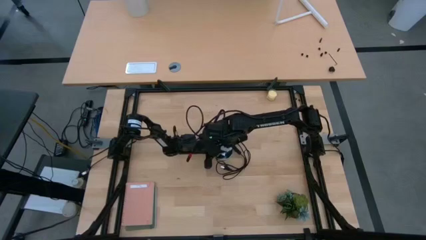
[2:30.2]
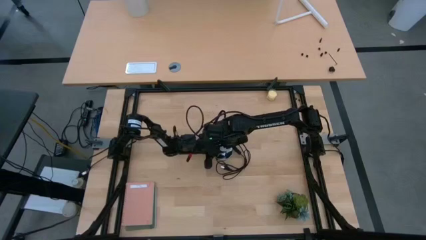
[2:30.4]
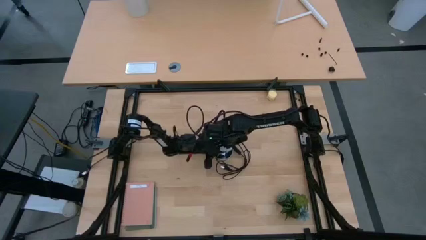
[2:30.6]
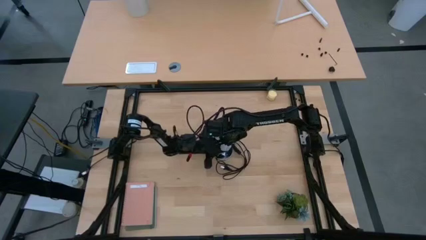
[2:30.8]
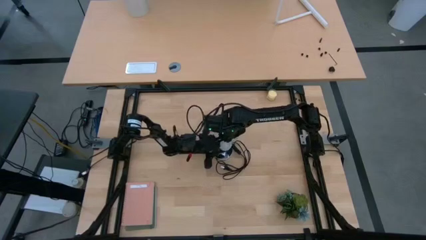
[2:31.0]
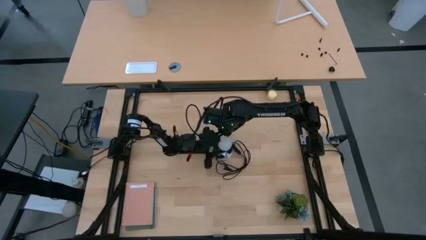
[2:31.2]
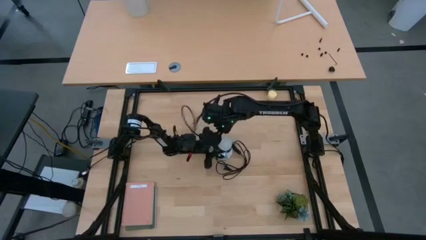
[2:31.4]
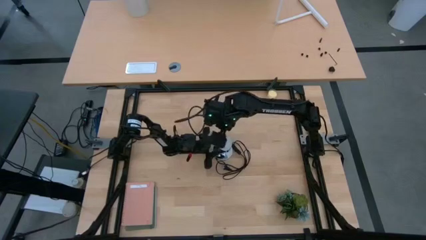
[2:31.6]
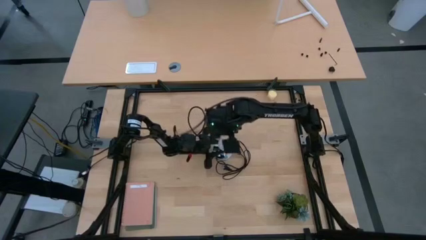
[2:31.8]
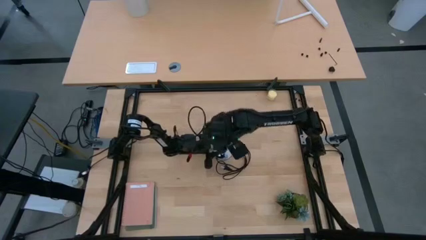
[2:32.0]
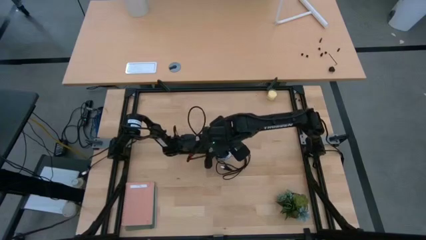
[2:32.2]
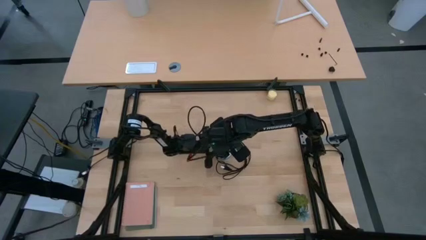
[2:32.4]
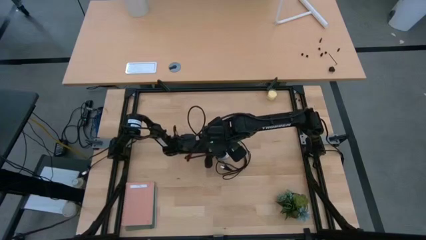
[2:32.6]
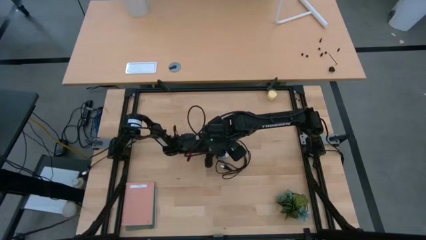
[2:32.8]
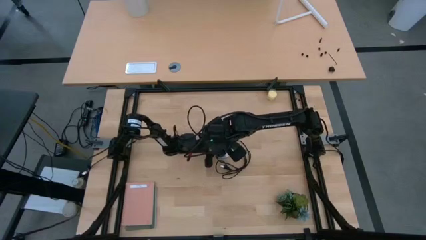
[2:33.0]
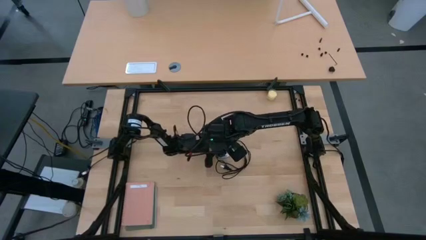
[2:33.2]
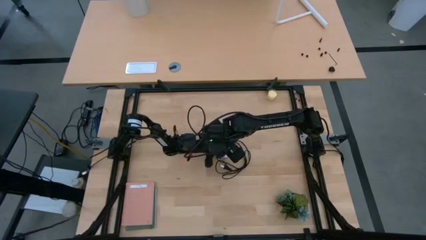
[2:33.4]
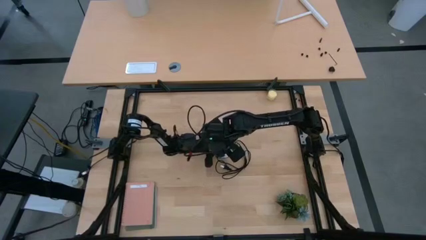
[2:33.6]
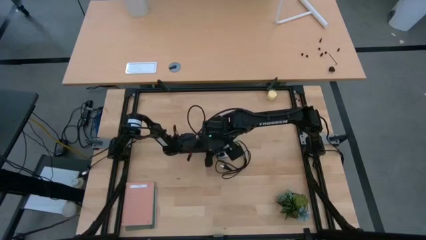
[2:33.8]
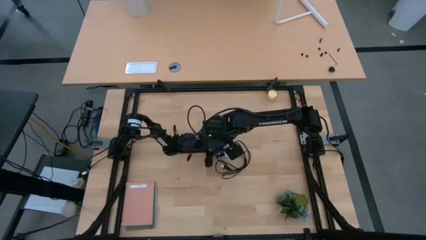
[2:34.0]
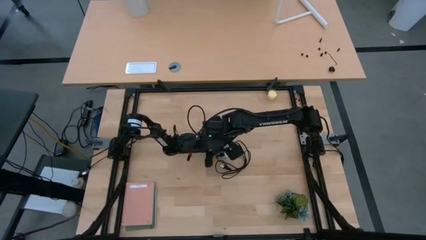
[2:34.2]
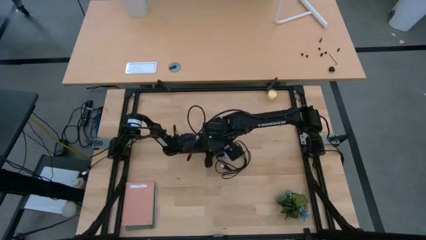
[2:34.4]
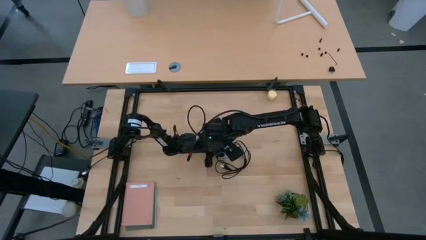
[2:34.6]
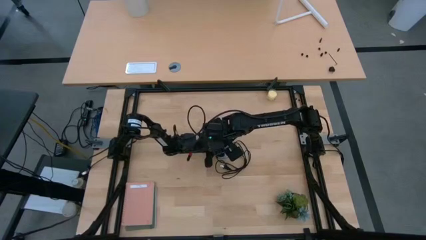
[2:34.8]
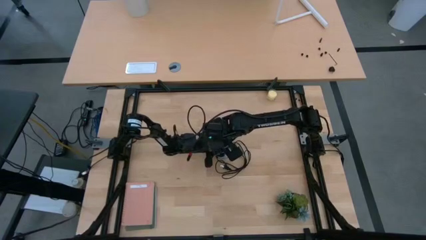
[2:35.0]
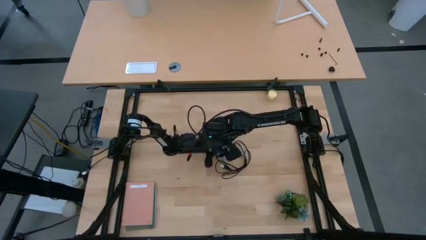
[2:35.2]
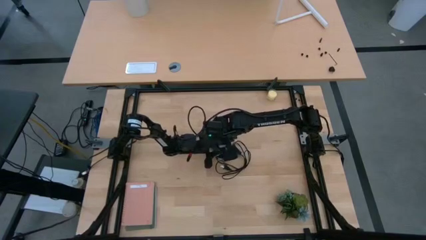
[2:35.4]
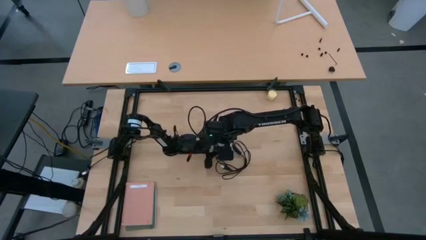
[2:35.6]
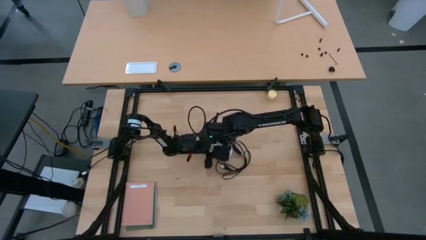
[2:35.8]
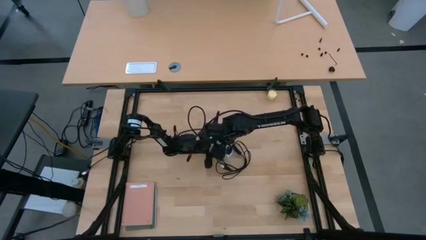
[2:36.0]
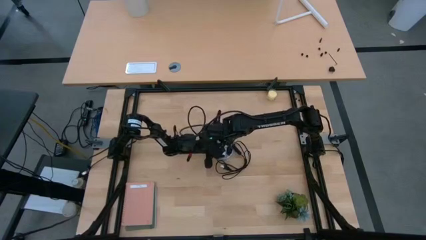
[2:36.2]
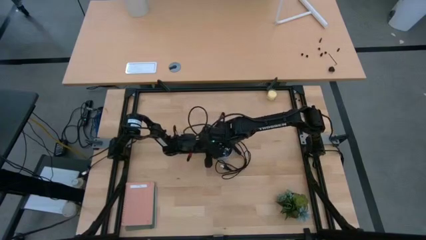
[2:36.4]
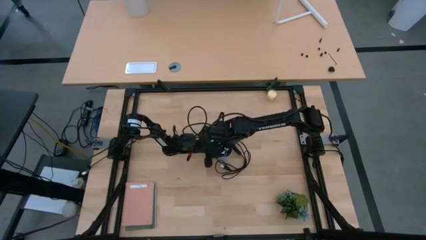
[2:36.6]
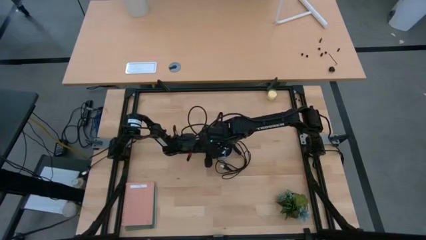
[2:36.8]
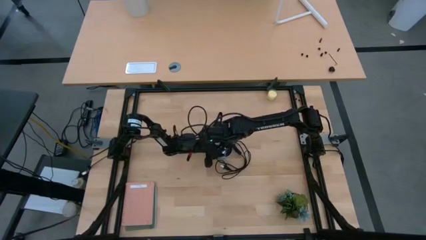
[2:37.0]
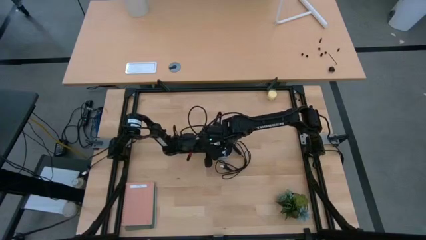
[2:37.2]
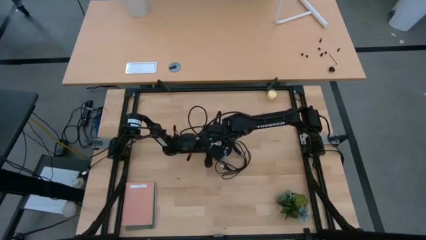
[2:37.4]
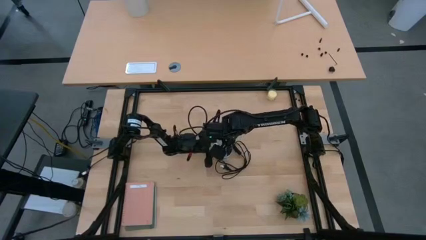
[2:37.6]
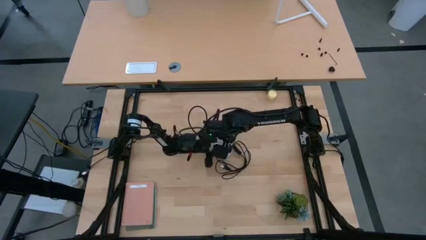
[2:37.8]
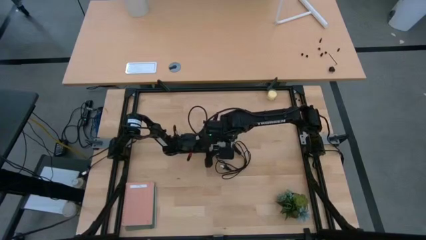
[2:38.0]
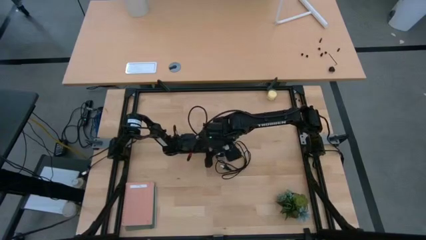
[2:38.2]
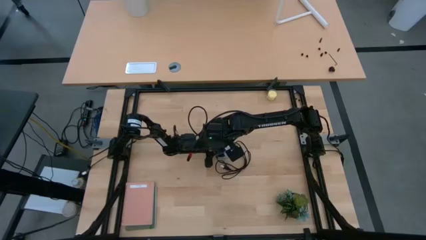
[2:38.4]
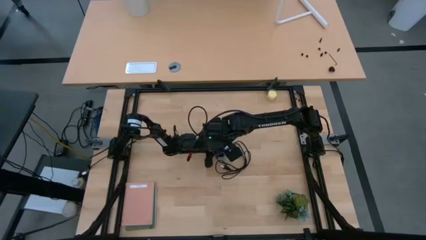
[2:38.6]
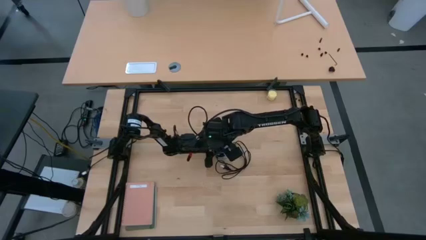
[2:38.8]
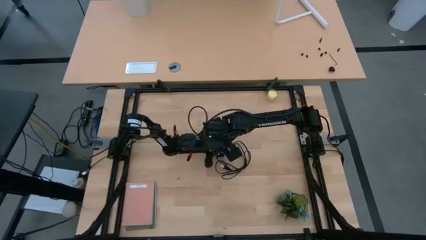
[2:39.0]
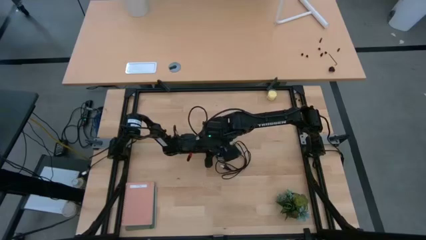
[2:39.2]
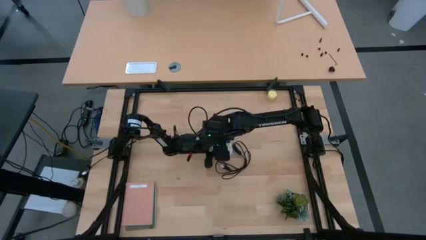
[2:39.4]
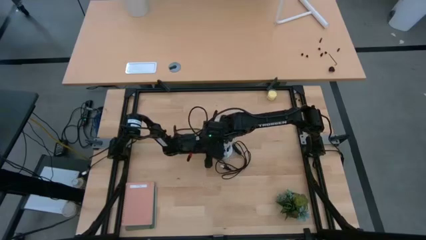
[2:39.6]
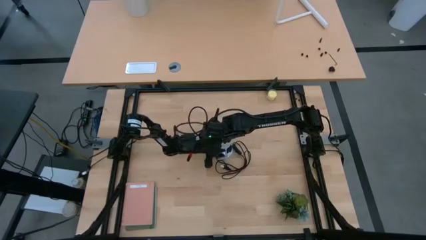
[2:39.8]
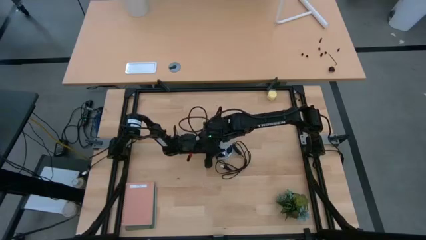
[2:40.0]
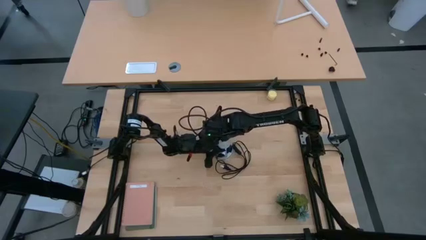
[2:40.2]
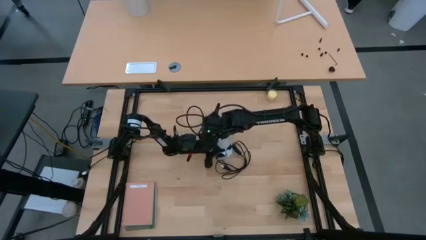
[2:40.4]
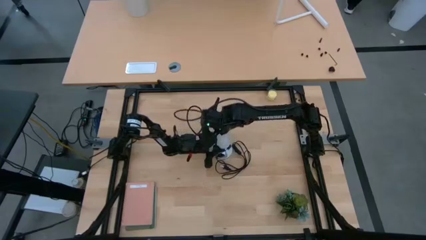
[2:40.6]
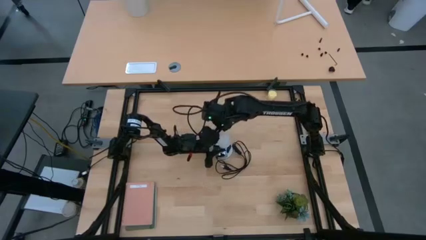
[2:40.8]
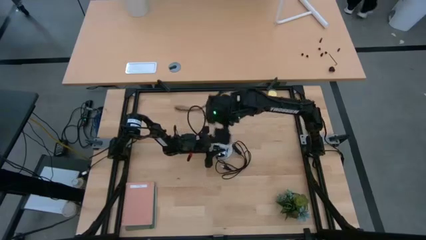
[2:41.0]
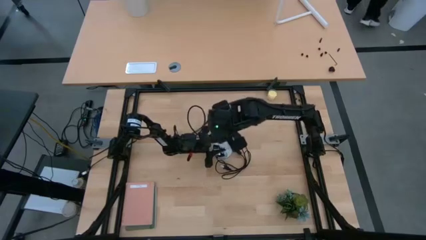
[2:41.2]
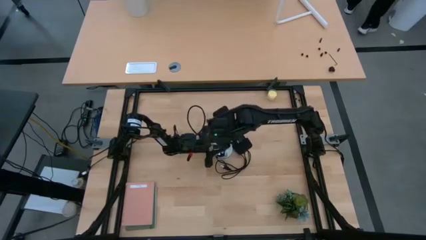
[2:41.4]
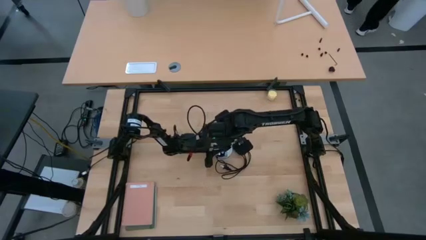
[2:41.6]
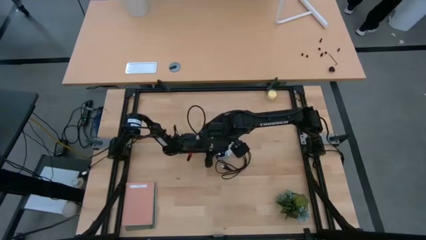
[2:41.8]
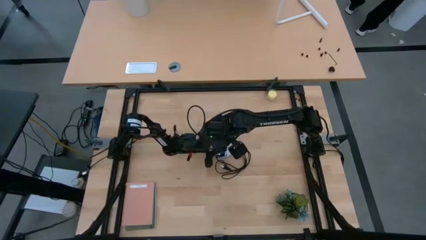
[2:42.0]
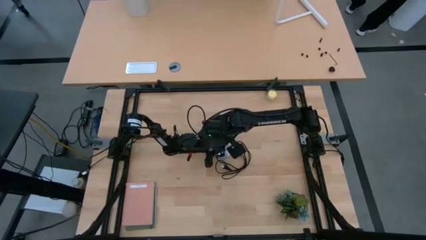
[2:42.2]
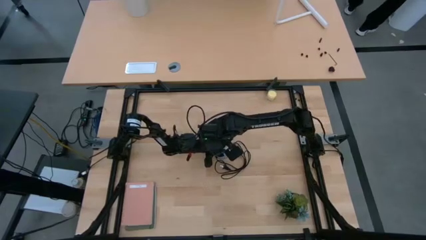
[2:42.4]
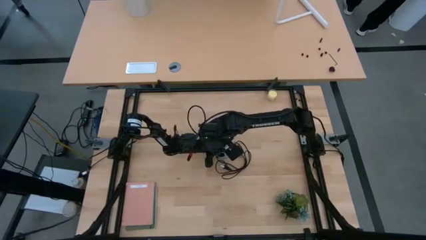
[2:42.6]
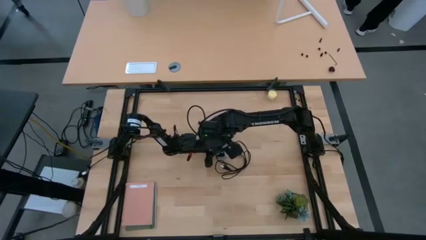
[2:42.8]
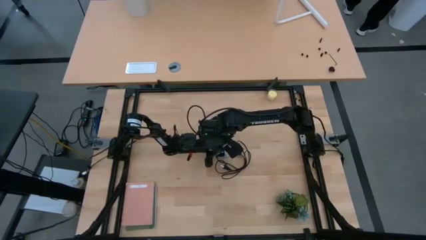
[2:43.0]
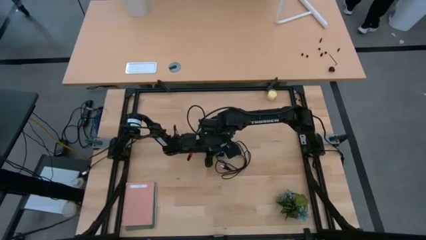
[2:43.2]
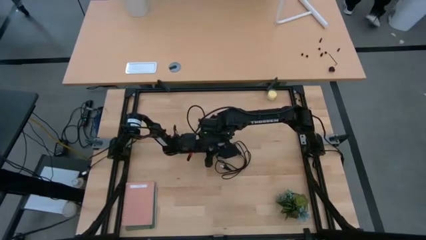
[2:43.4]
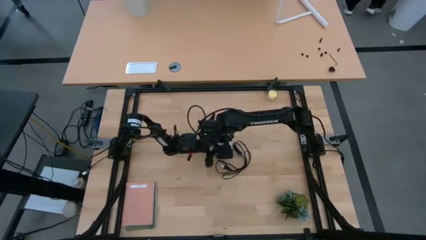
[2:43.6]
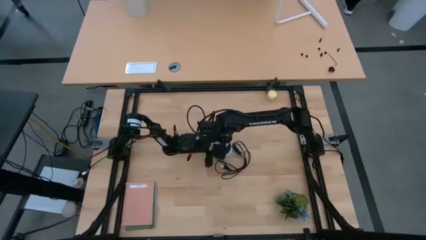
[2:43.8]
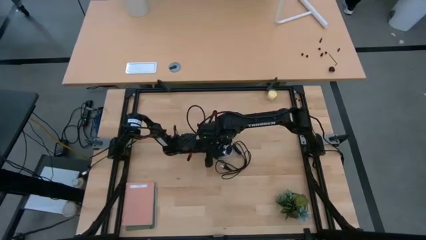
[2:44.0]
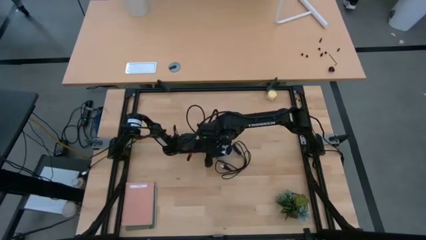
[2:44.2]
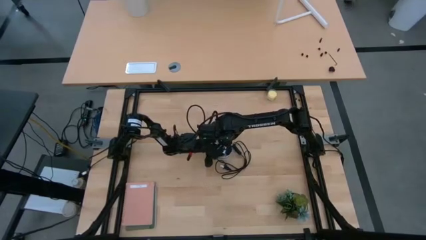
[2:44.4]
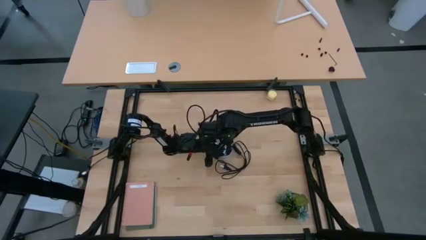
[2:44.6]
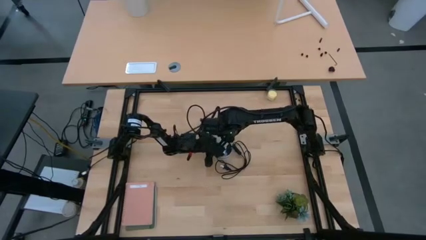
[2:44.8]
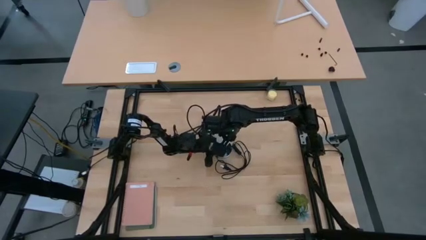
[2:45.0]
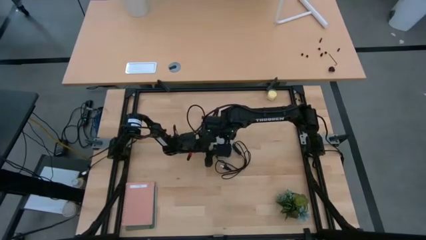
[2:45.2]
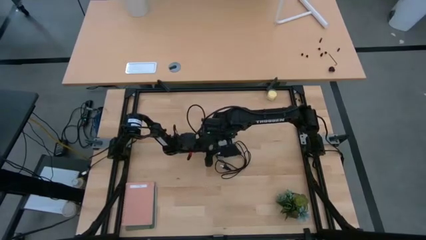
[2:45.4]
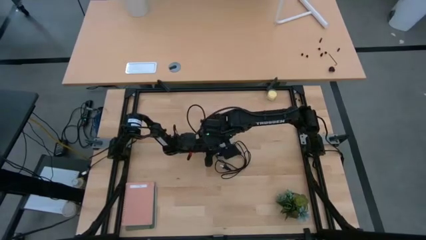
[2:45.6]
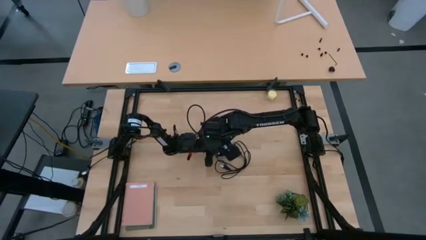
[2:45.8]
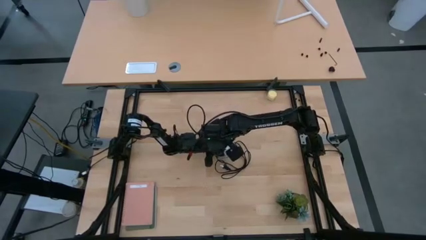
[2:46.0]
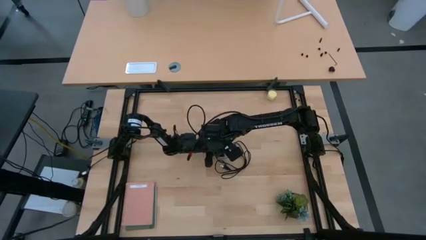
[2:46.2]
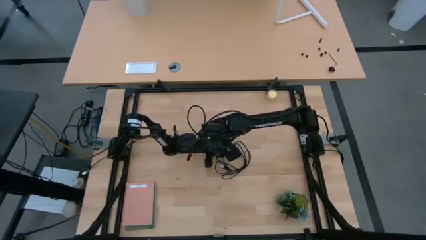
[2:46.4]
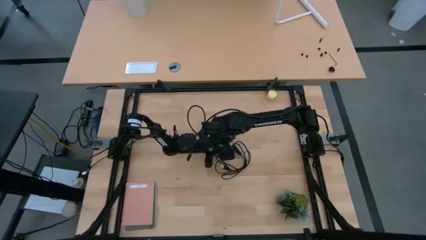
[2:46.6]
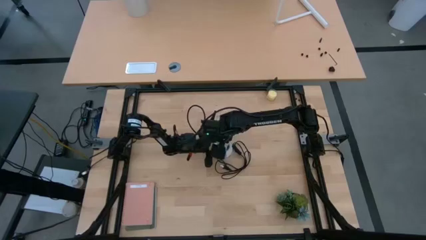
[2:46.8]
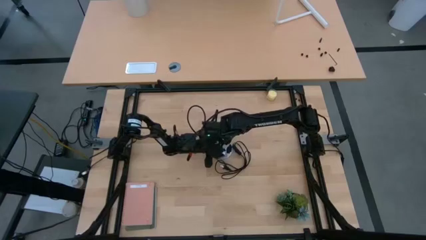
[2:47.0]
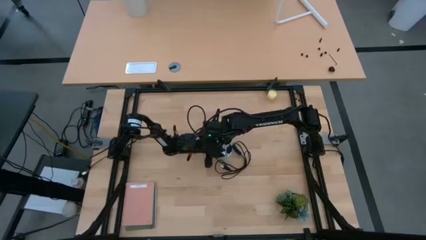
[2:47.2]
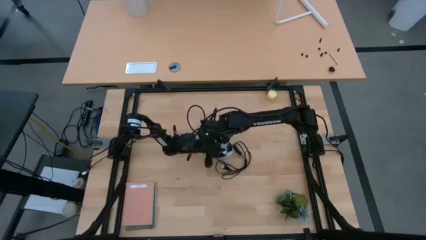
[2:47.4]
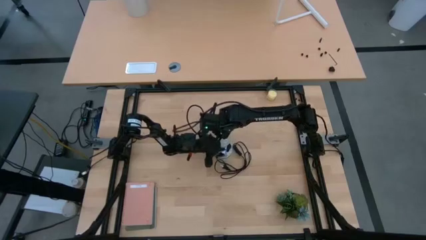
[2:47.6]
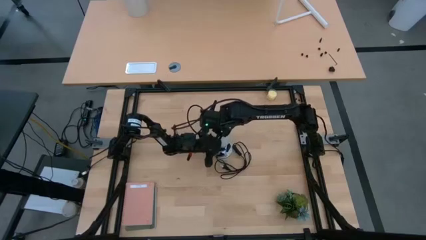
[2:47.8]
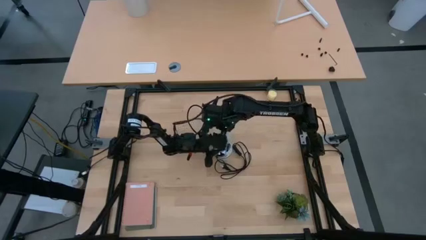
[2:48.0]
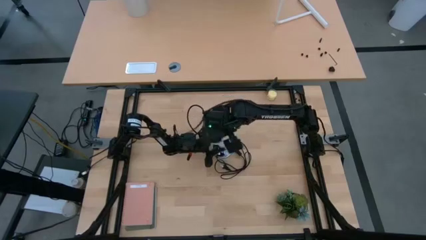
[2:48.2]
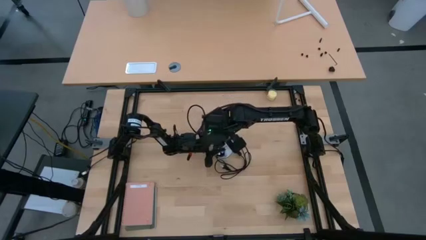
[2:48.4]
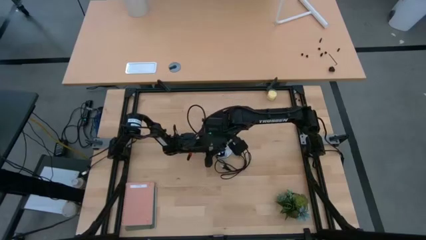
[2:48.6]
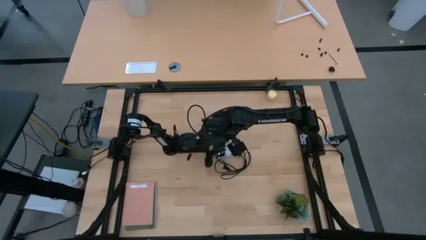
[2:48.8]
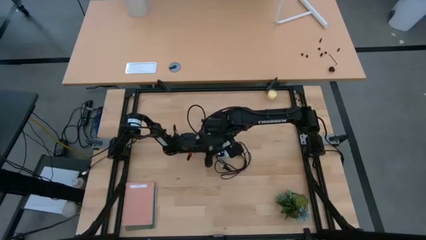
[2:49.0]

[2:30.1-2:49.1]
Task: Screw lightbulb
Insert the white lightbulb into the silver lamp
